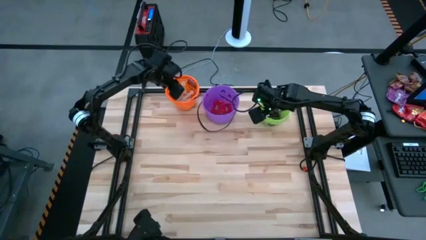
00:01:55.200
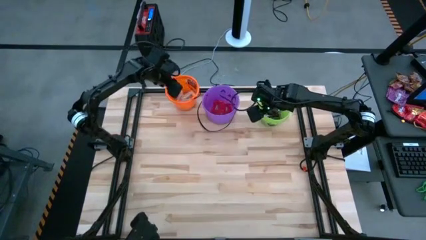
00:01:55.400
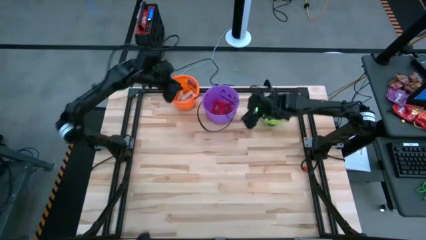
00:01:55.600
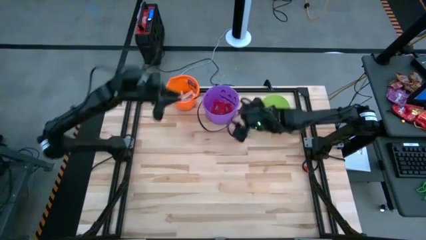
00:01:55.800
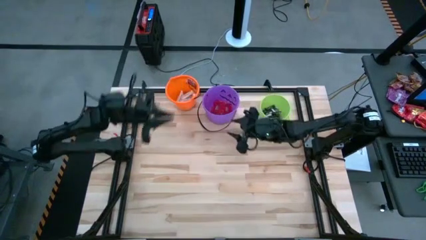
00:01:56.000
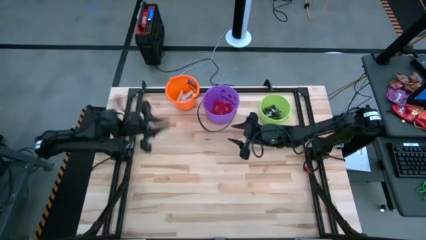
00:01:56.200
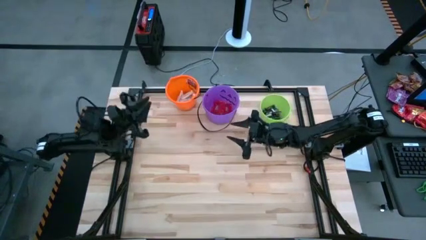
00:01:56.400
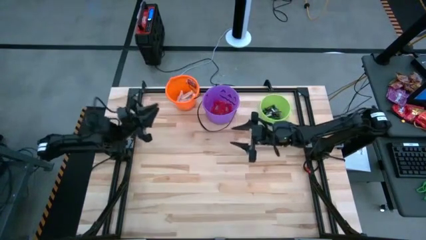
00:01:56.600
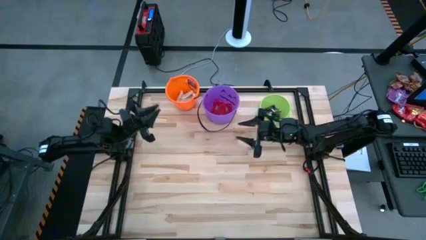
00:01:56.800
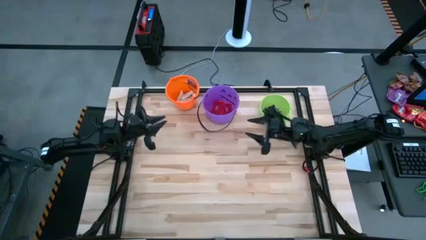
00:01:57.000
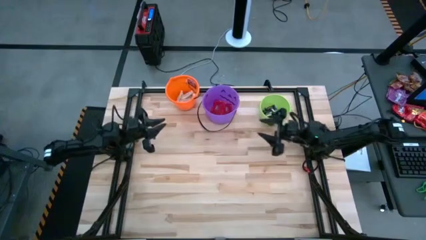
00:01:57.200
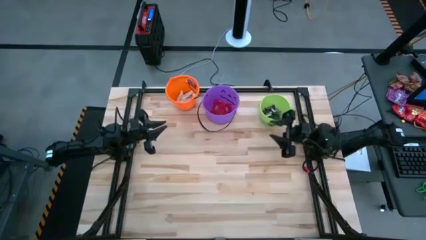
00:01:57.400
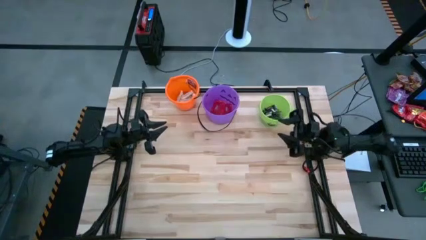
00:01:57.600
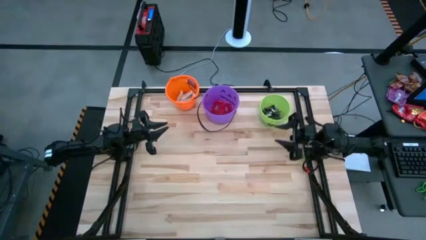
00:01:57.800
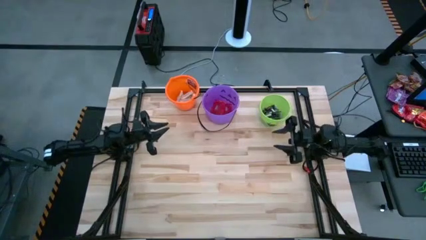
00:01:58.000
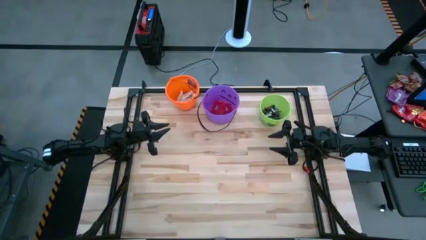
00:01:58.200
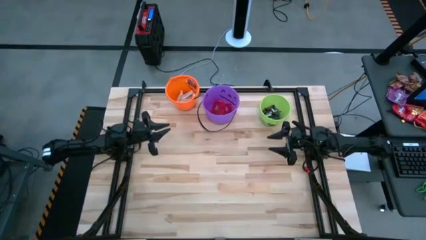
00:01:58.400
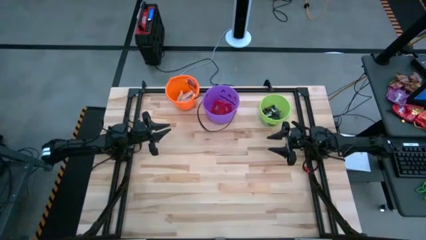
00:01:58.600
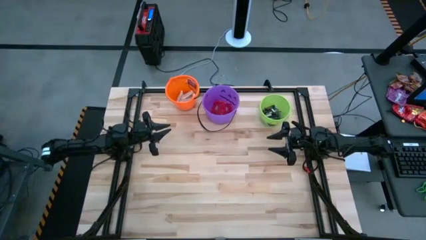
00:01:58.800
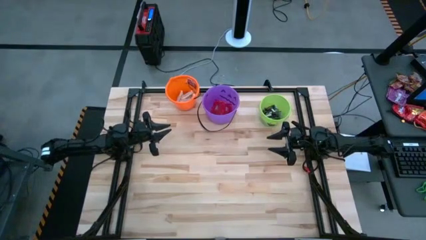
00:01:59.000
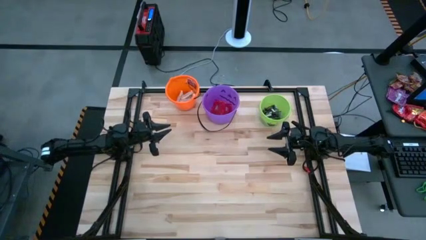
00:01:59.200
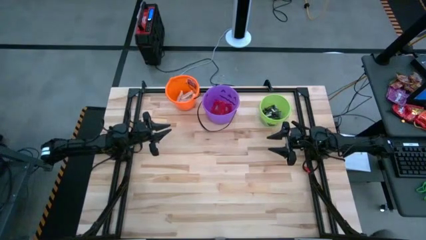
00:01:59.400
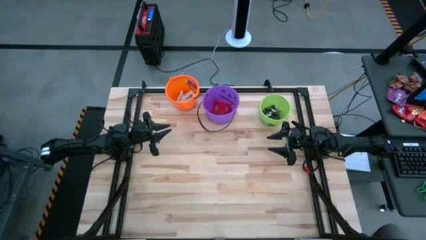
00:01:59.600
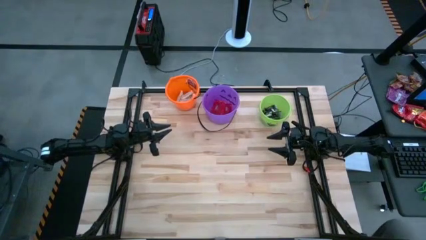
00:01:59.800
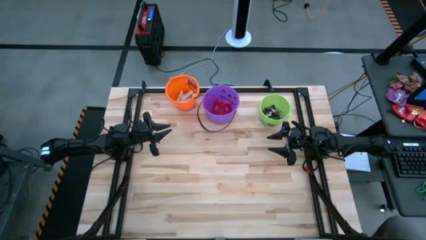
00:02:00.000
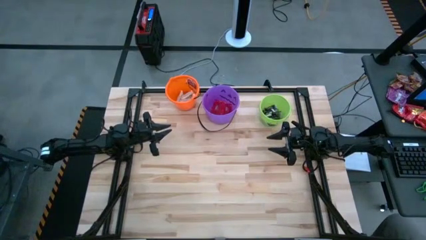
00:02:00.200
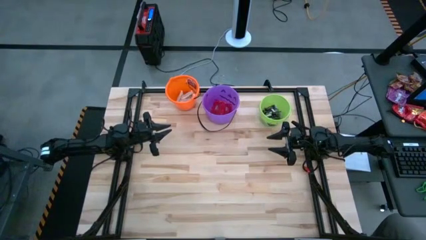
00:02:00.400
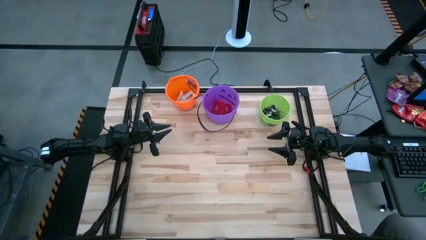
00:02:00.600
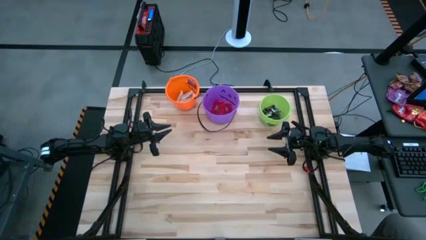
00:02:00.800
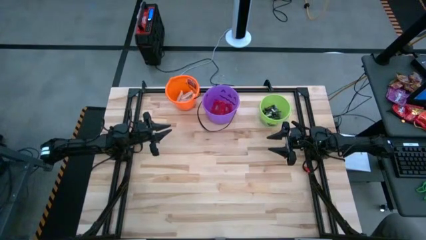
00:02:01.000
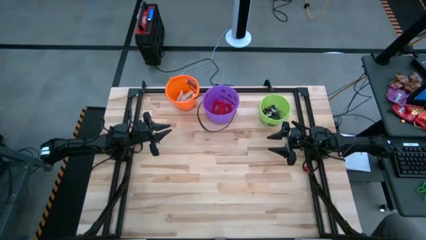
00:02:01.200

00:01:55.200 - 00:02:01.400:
Task: Sort candy by brand, put in halloween buckets
Return to Home Position

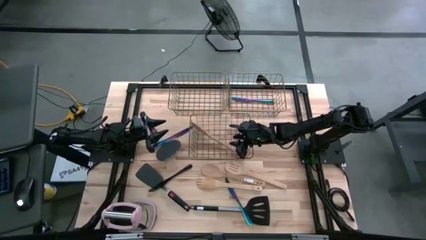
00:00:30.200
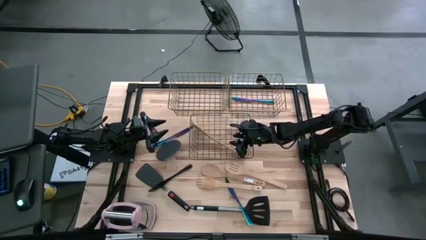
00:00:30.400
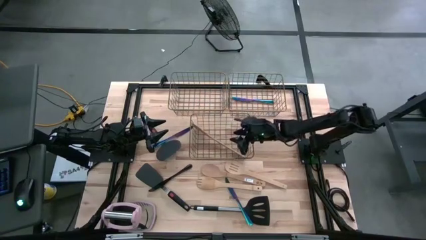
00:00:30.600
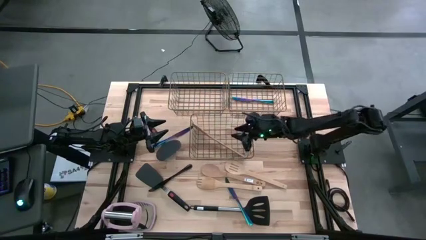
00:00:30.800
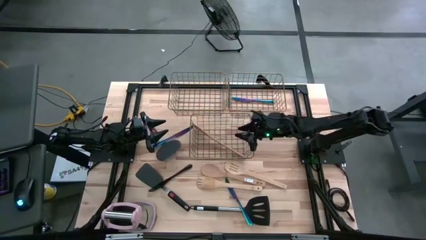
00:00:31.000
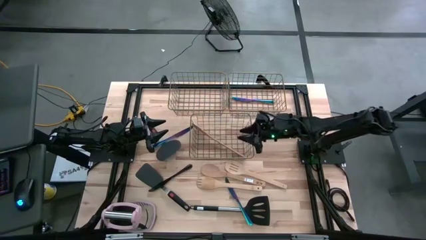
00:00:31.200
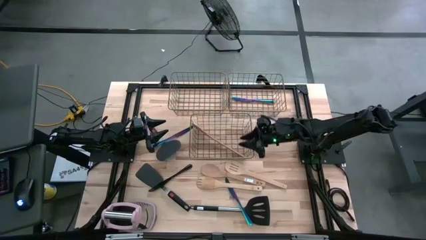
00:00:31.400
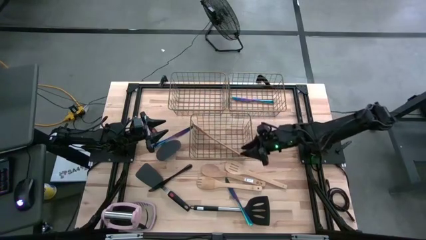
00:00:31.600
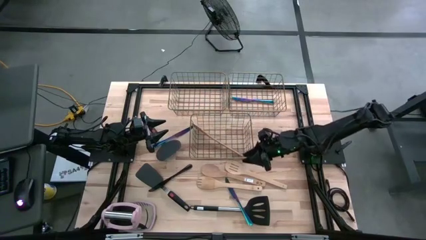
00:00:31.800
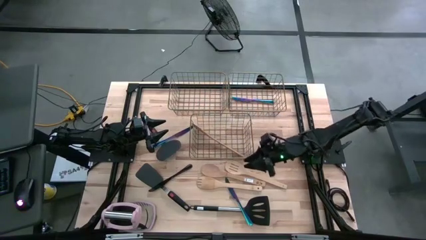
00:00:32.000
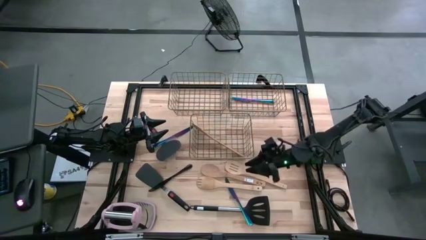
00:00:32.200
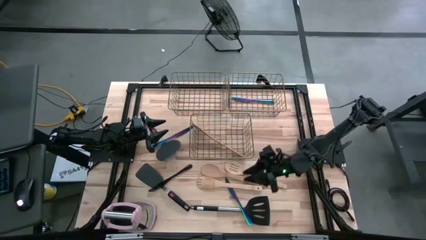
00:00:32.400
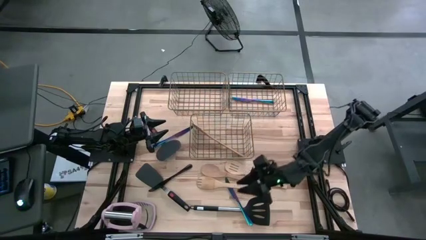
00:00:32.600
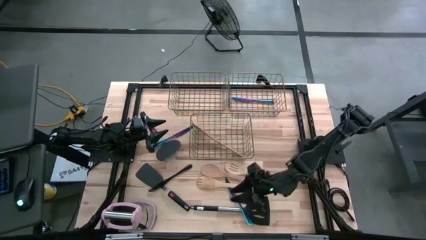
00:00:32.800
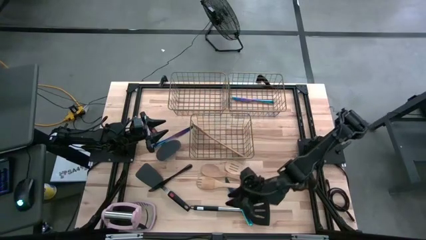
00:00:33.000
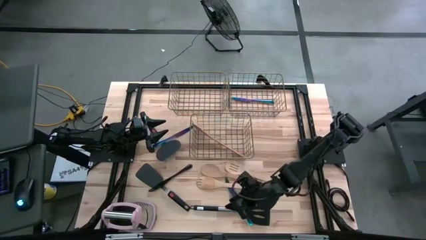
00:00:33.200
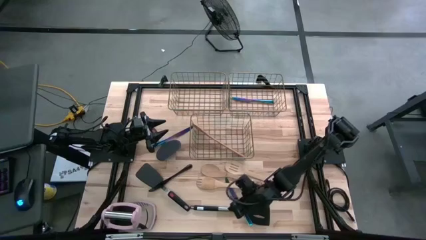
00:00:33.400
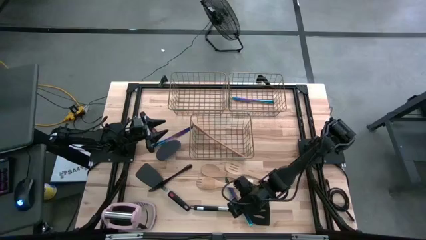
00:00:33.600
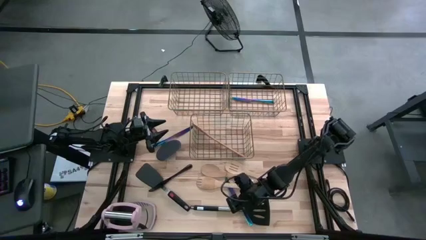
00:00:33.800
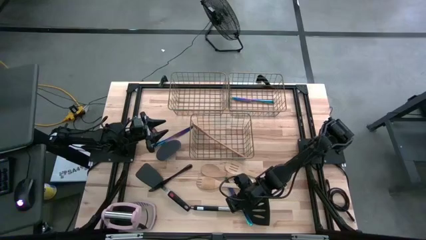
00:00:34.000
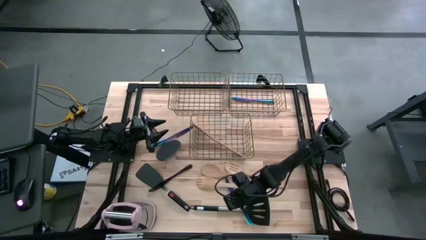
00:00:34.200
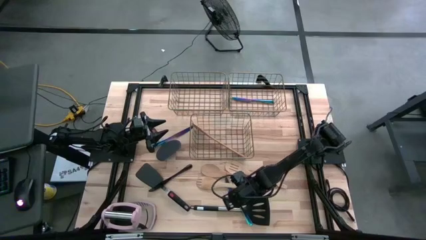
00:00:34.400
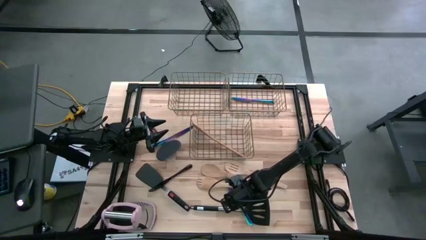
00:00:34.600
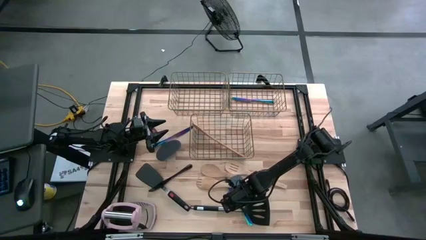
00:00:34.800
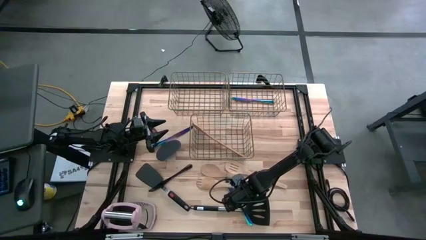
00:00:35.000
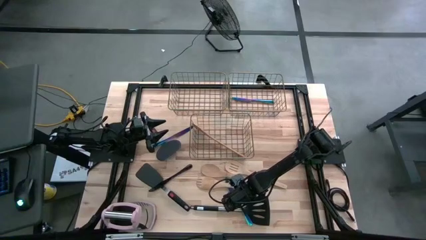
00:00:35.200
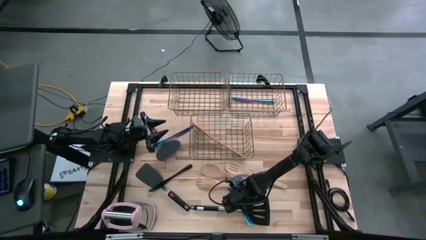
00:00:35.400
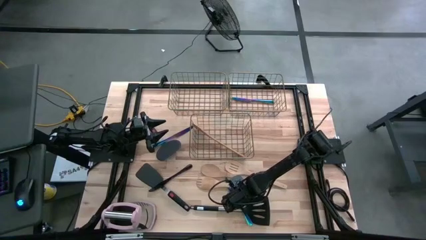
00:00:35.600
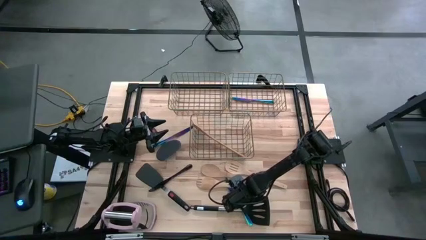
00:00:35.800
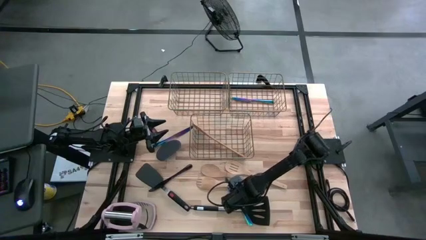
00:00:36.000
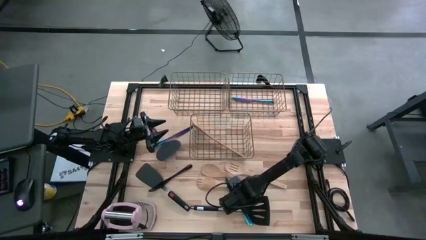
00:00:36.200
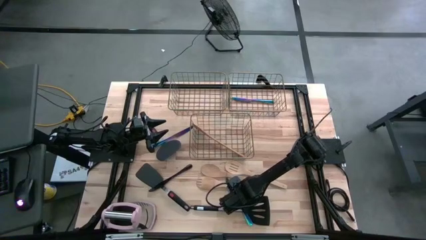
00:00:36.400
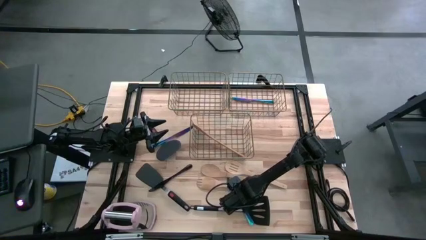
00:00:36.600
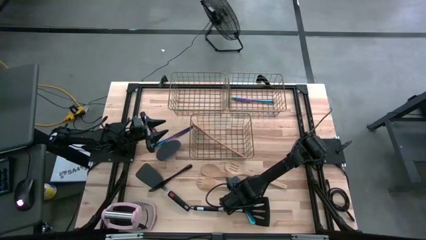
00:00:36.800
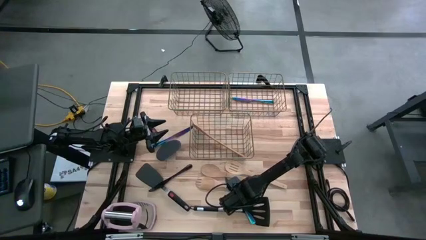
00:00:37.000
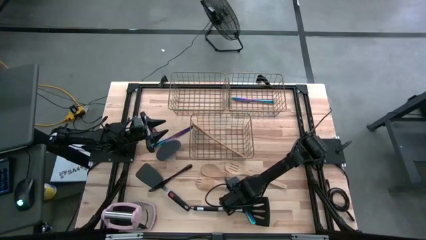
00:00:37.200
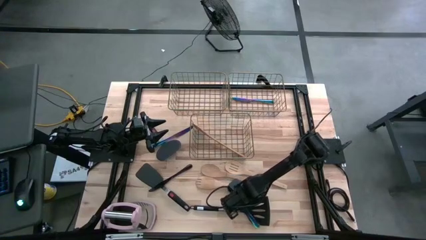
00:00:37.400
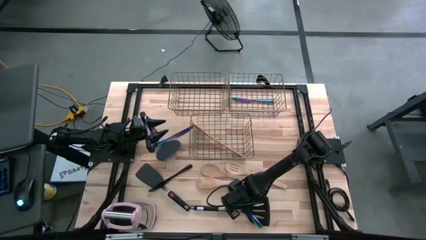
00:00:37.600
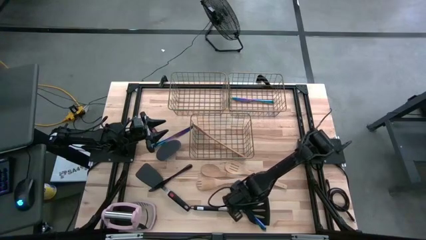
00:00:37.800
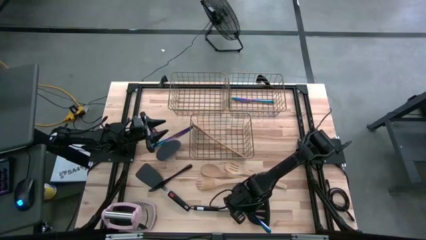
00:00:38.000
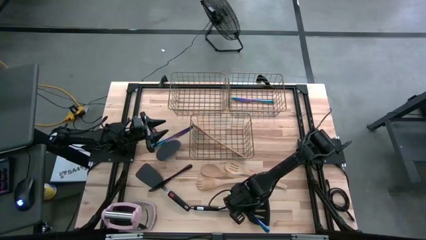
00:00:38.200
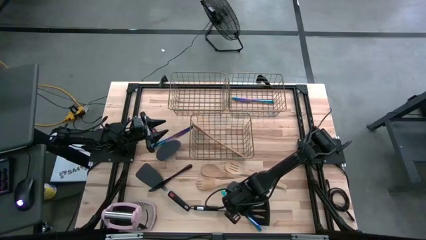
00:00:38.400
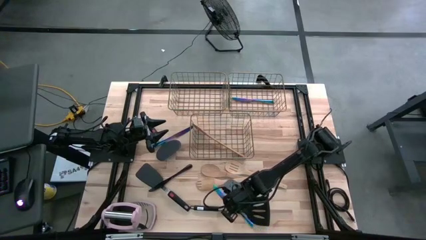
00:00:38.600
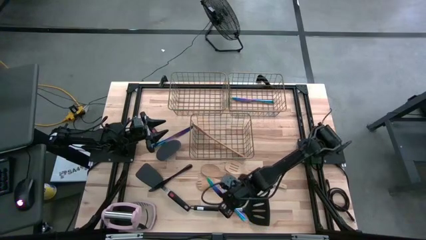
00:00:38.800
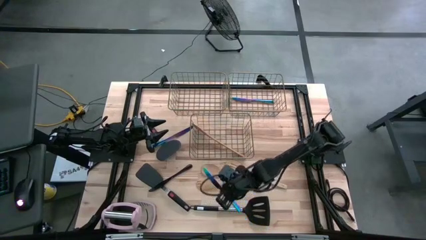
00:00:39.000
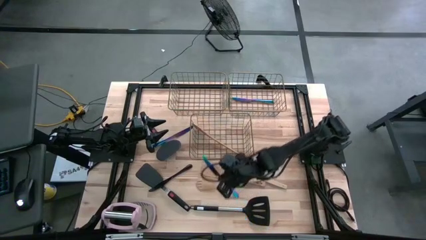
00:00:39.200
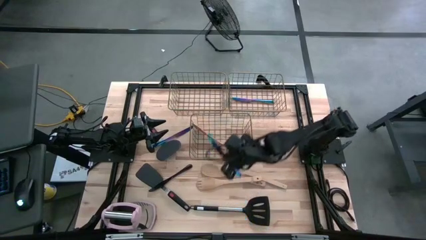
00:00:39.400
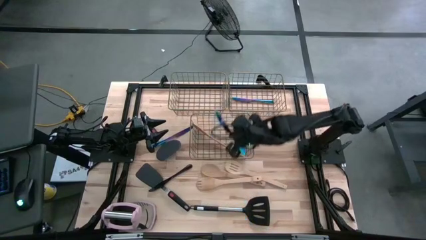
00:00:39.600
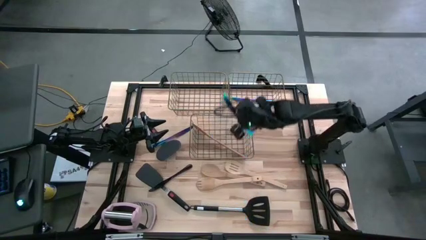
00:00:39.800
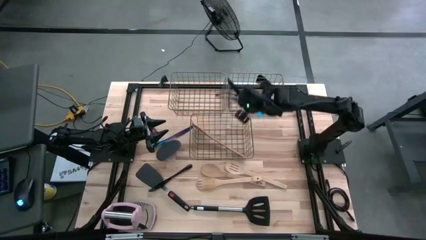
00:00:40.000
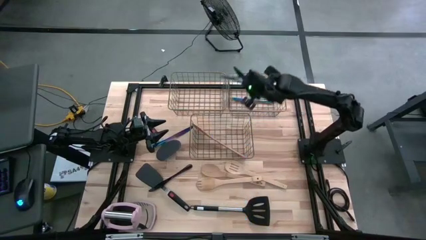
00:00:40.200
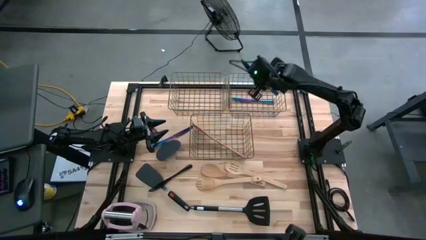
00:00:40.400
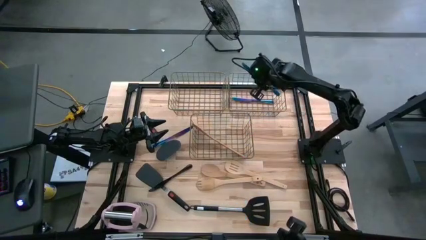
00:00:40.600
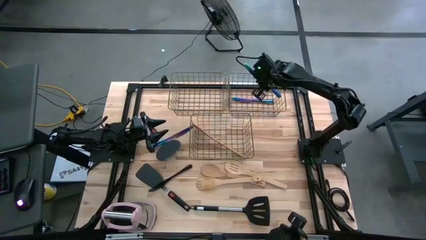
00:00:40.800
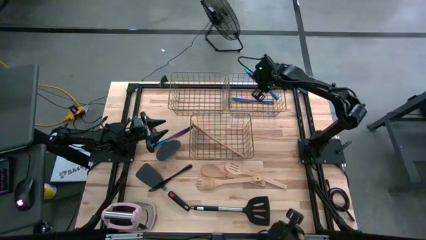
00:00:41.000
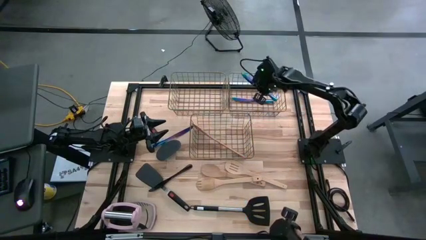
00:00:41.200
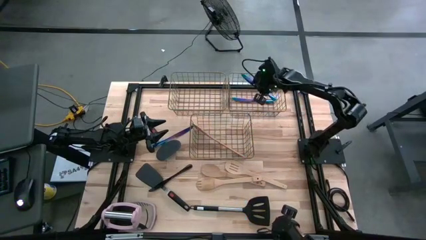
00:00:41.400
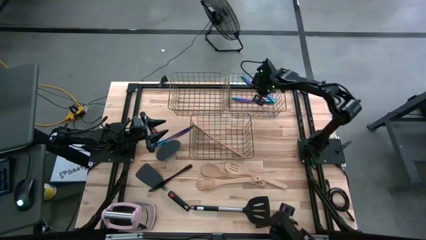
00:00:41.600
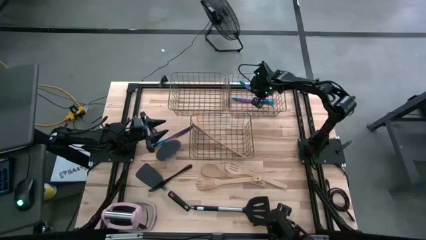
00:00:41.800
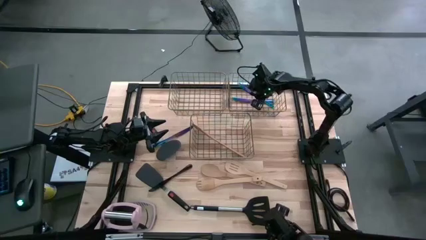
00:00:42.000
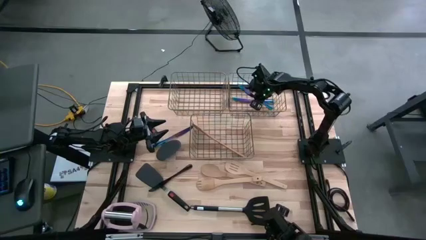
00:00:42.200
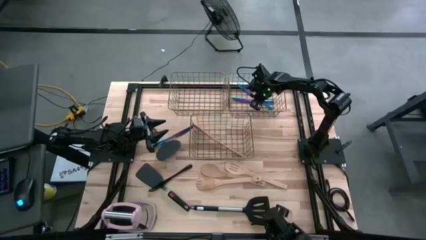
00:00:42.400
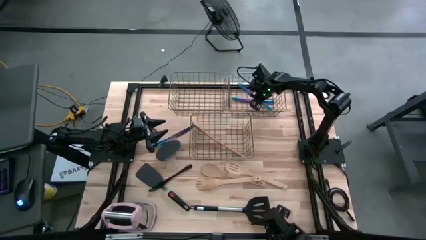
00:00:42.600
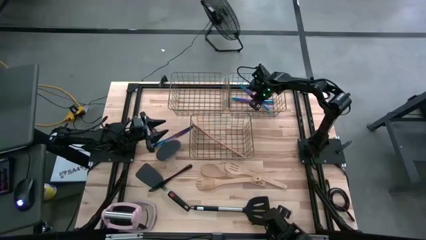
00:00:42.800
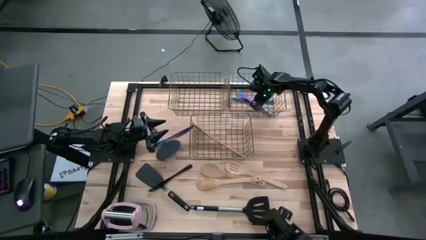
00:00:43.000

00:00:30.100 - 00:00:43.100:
Task: Pick & Place Kitchen Items
Put the blue table knife into the top right wire basket
